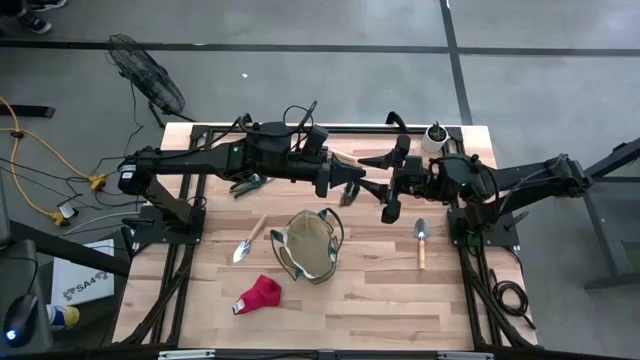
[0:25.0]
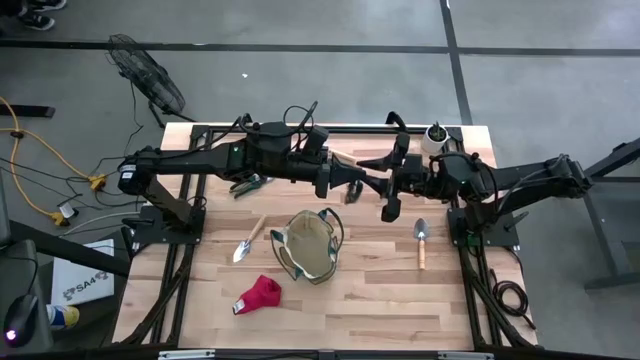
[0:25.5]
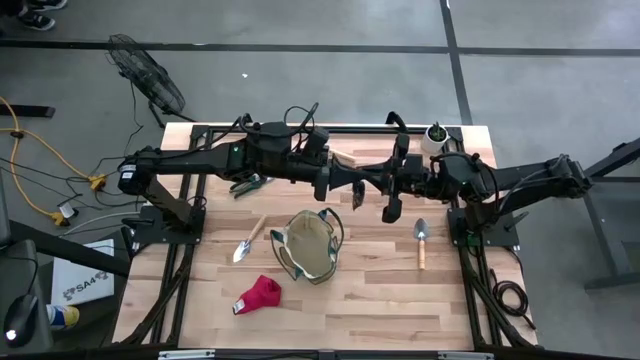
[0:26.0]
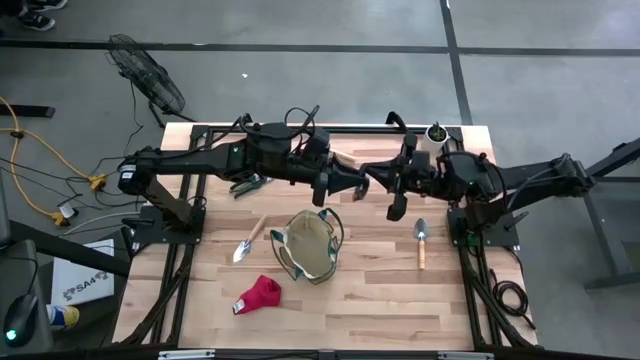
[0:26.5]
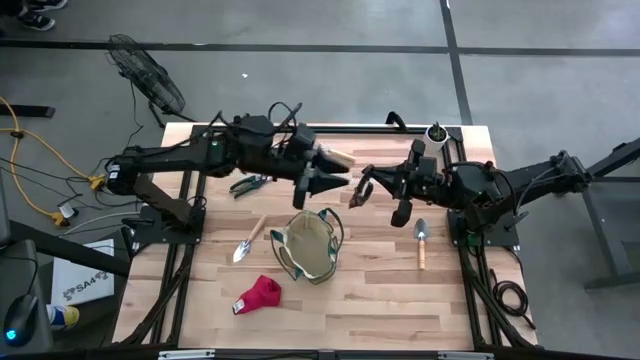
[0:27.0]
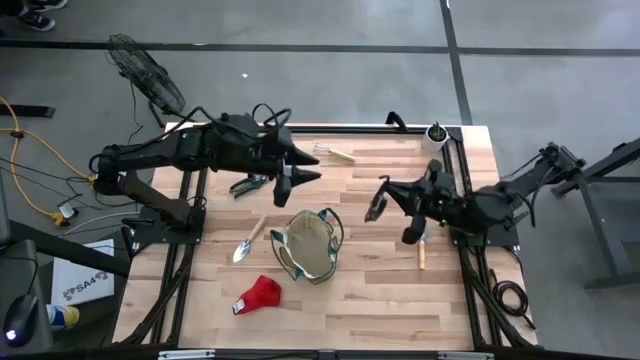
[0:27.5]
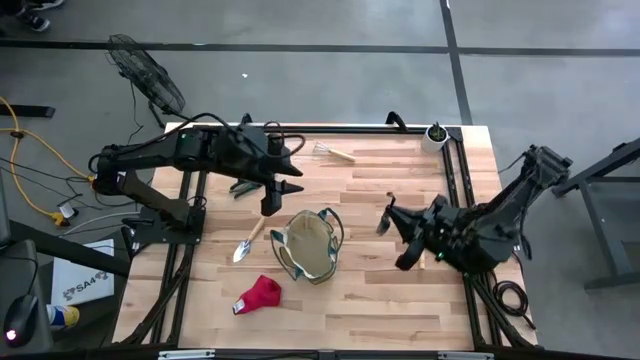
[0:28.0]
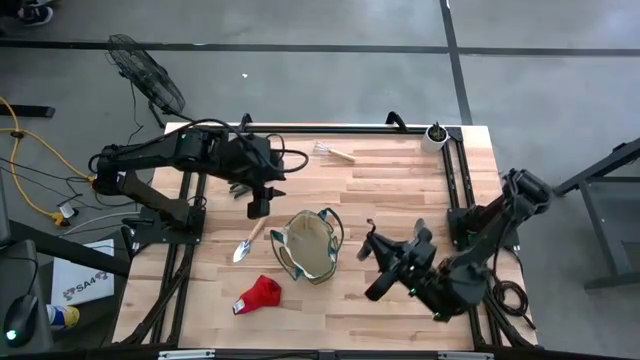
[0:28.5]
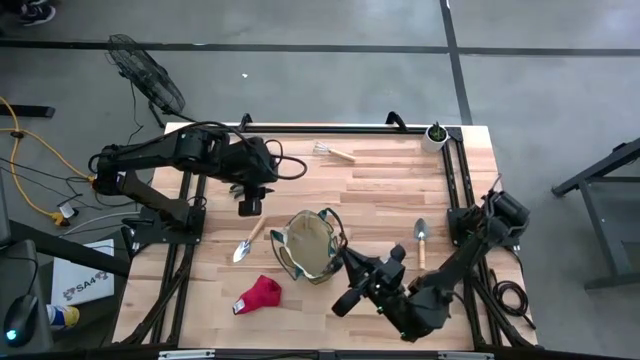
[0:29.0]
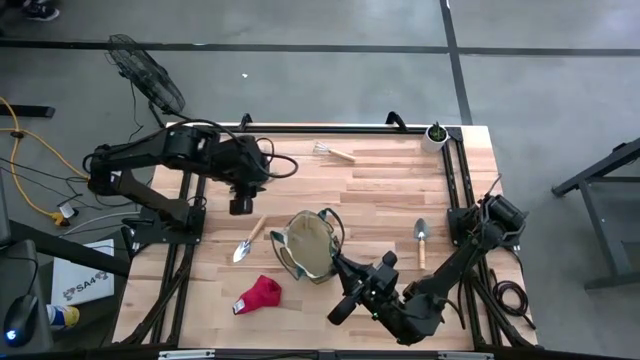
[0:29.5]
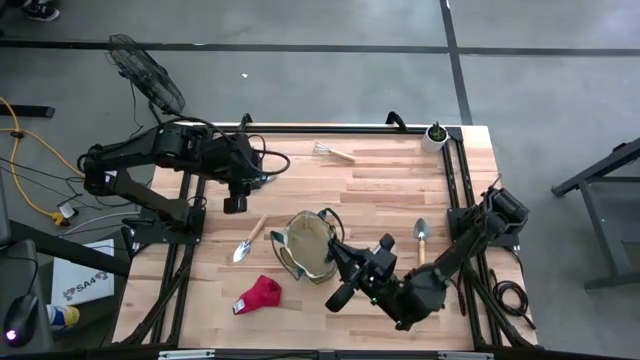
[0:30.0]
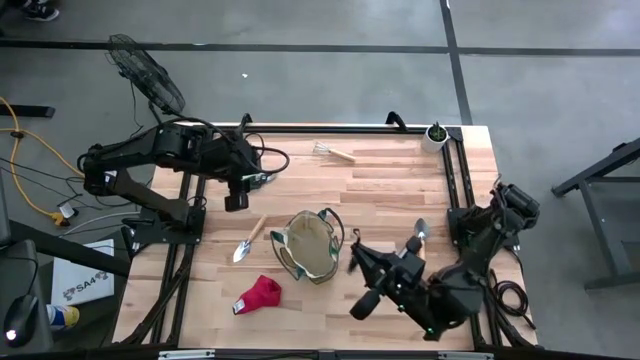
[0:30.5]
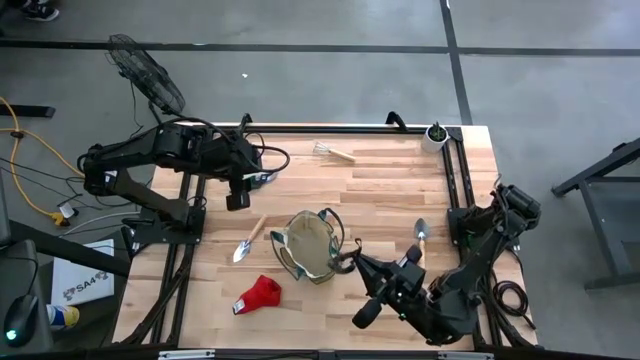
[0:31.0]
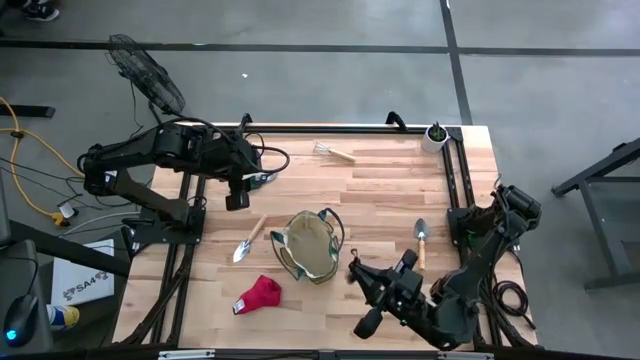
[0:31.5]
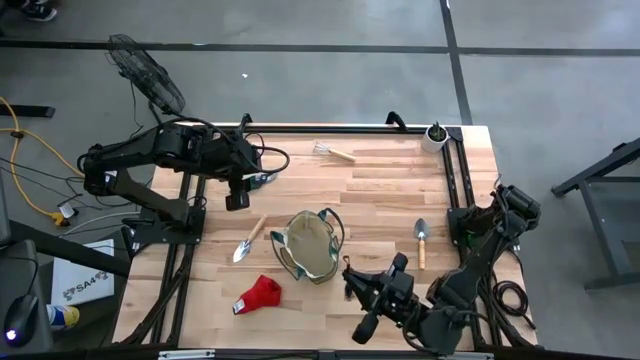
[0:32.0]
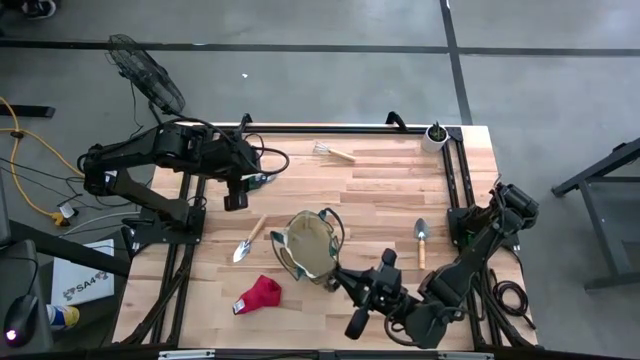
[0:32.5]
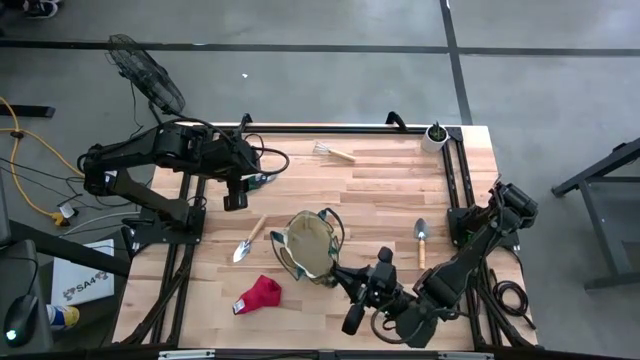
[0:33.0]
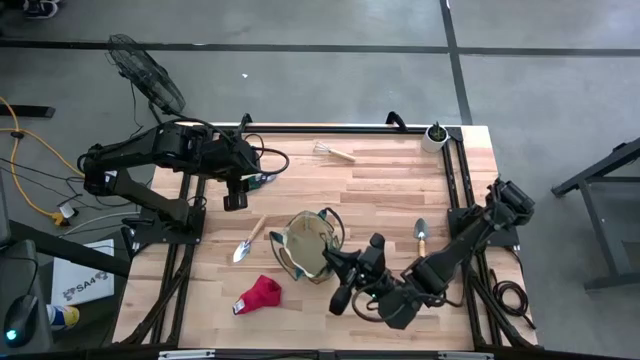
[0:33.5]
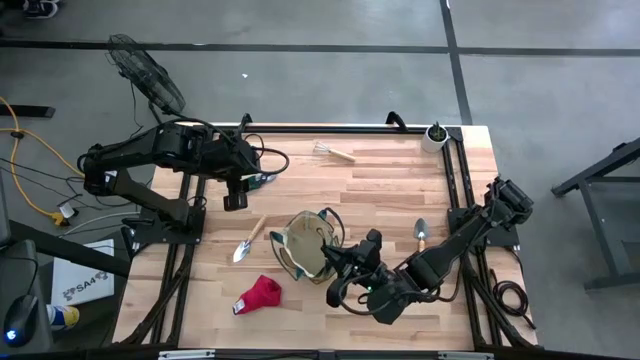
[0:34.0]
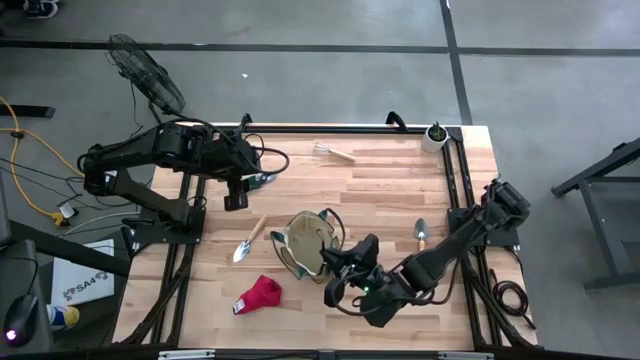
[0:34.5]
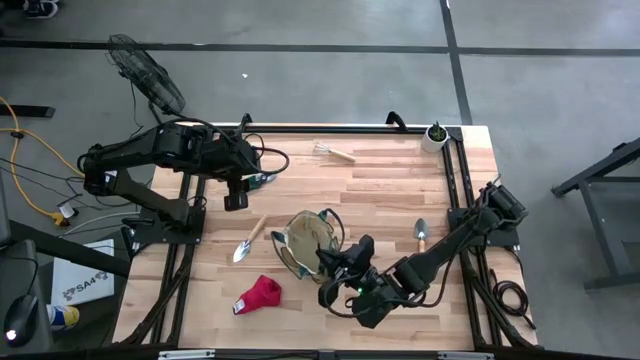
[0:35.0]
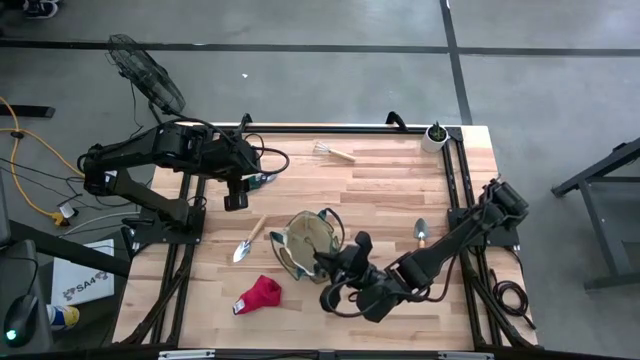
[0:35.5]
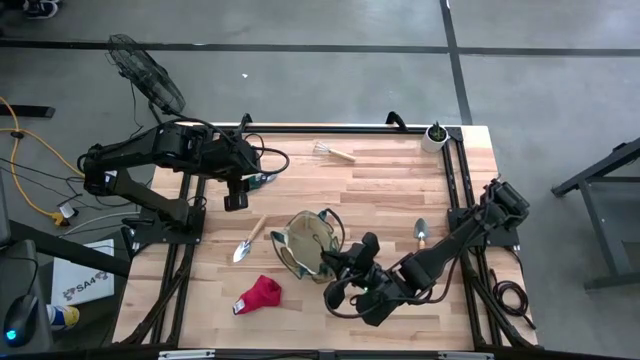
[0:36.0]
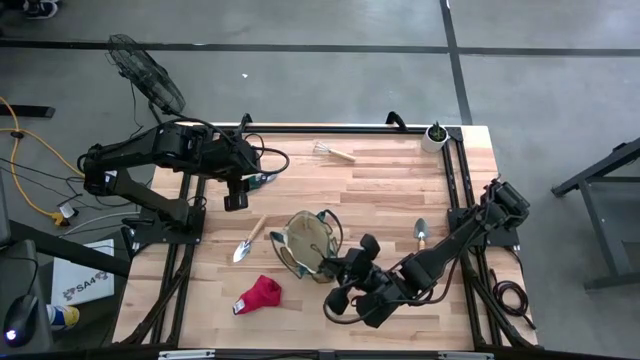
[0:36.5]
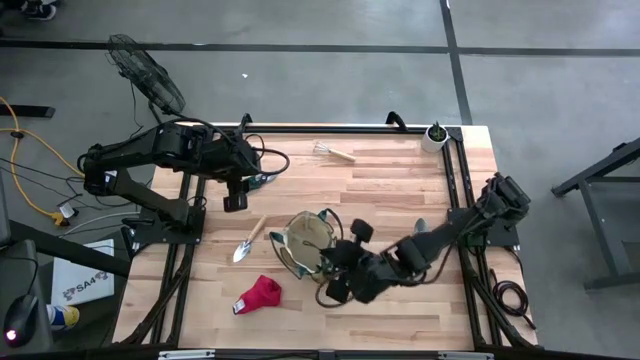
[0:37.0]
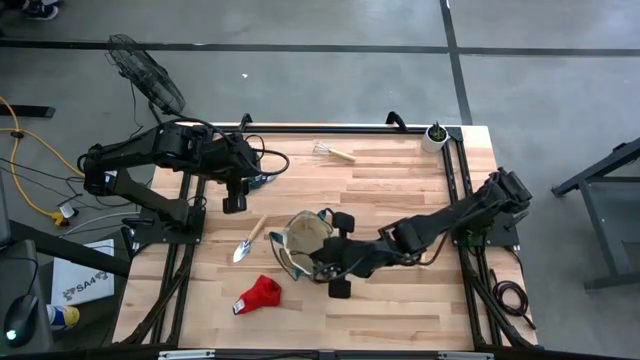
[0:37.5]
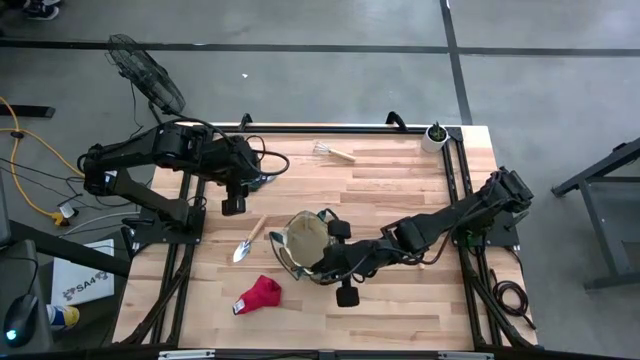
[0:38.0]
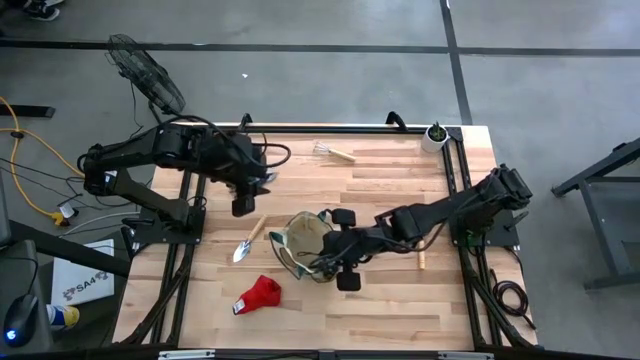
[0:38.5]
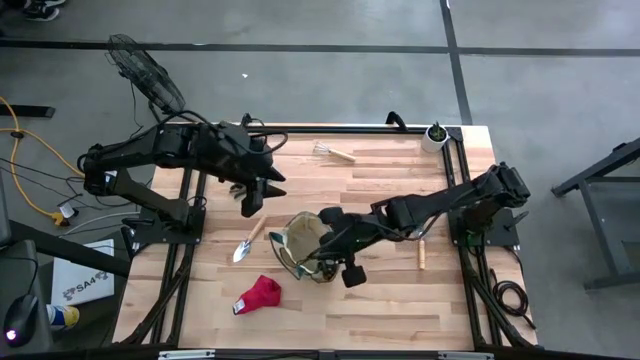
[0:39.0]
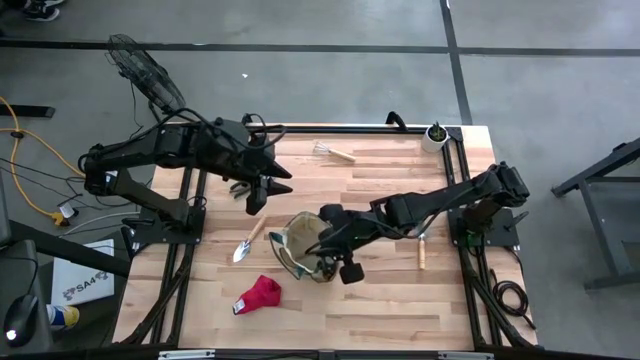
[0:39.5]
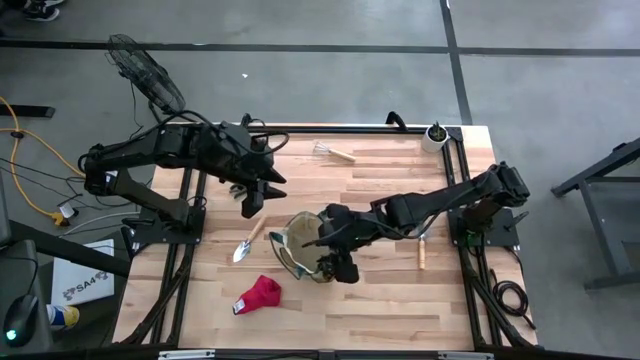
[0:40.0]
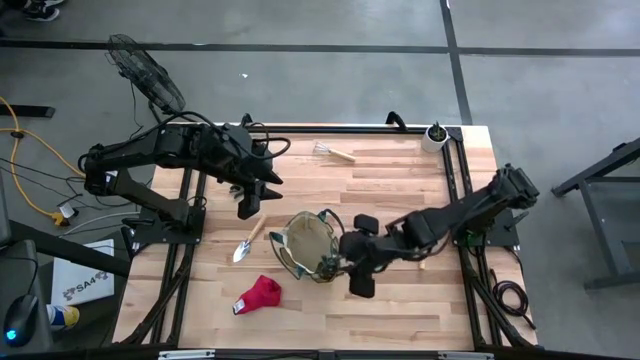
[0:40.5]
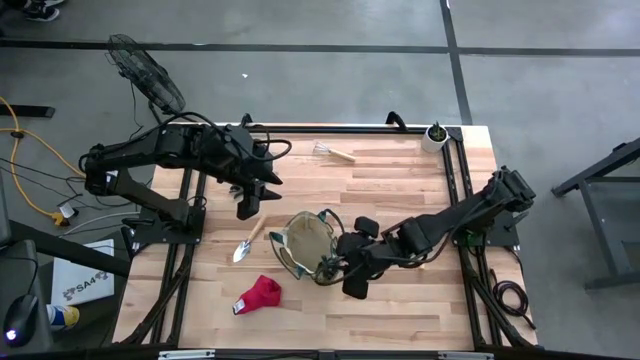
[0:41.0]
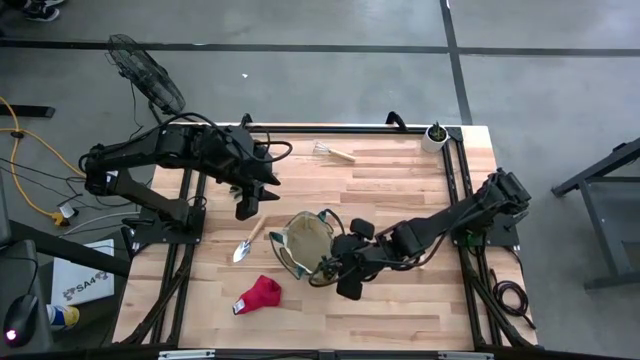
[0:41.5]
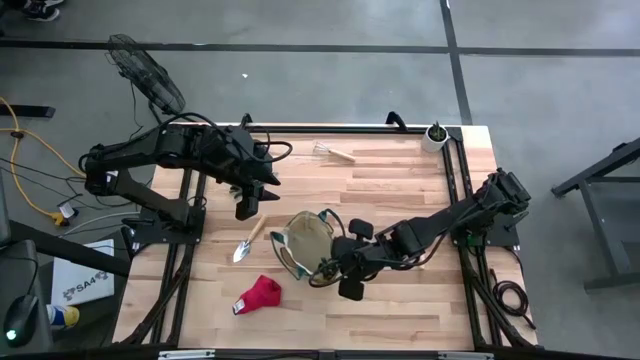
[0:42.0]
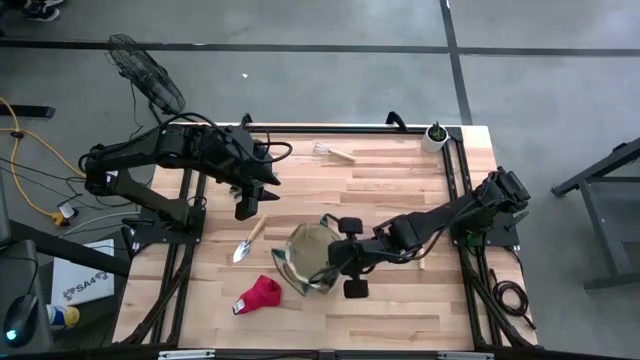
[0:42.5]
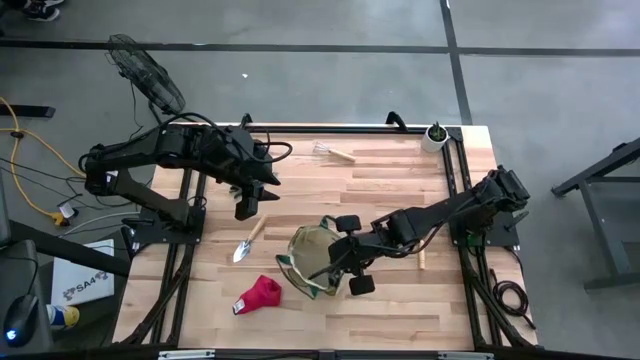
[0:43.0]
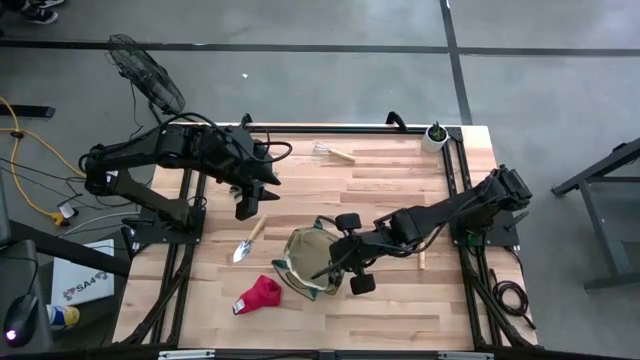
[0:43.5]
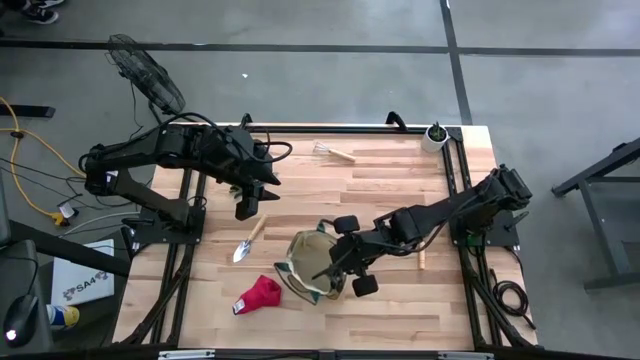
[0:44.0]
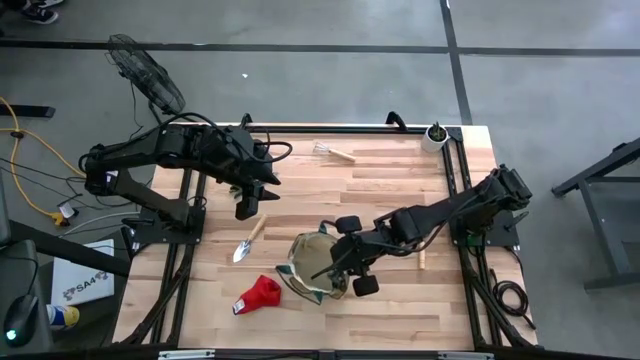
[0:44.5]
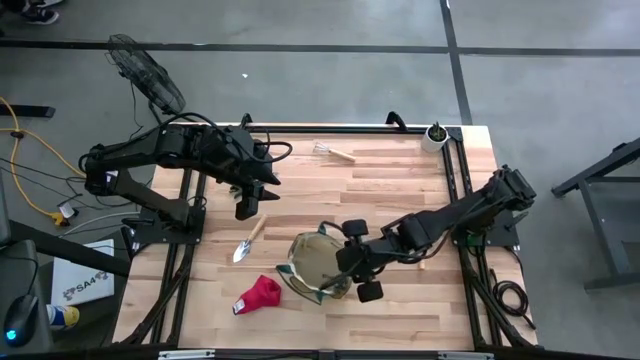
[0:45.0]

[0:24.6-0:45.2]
Task: Pick & Place Garden tools in Gardening bag
Put the right green shear scissors into the light brown gardening bag
